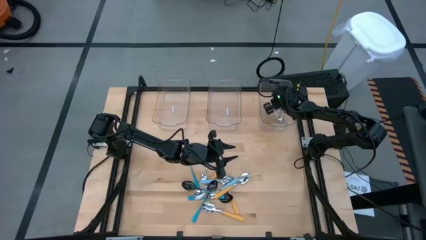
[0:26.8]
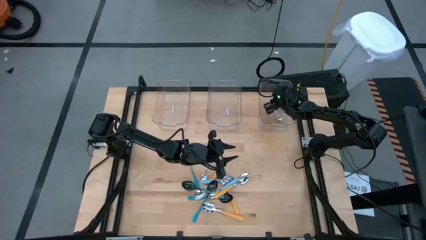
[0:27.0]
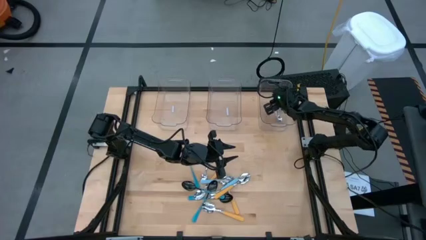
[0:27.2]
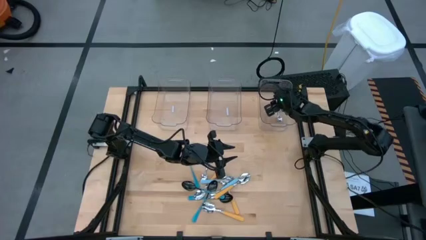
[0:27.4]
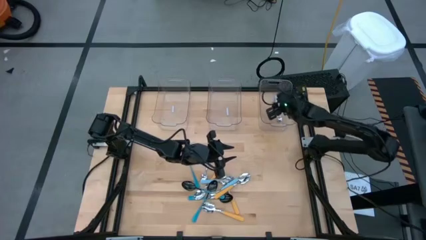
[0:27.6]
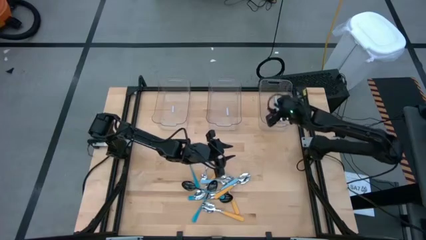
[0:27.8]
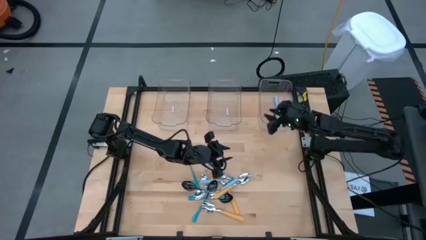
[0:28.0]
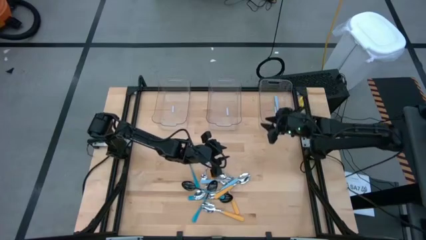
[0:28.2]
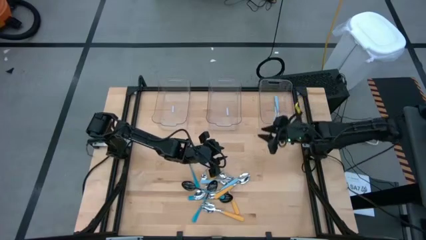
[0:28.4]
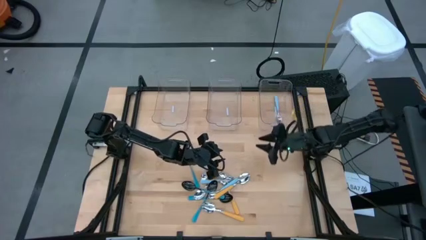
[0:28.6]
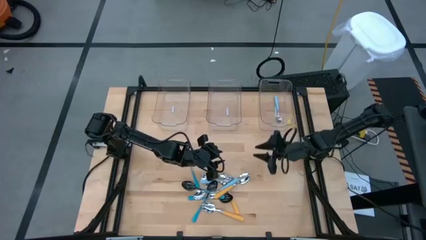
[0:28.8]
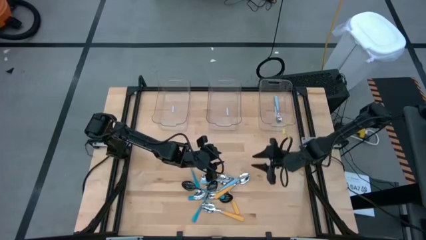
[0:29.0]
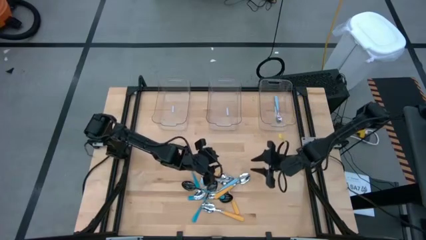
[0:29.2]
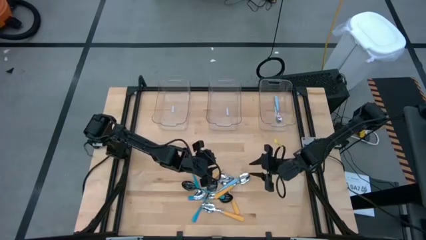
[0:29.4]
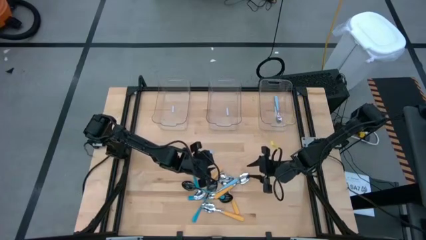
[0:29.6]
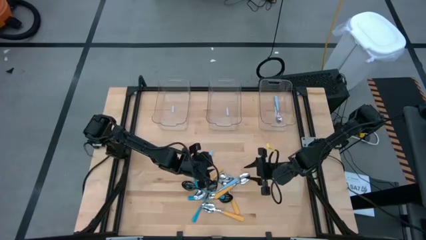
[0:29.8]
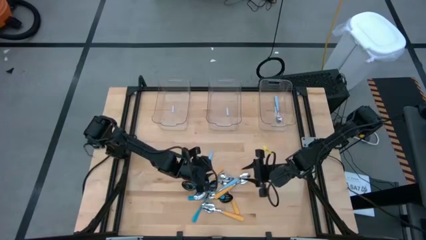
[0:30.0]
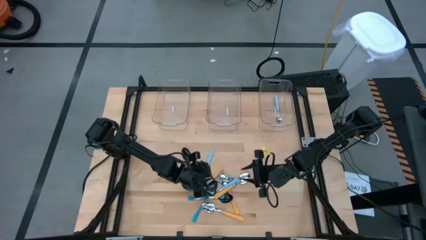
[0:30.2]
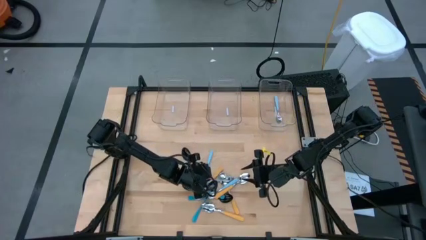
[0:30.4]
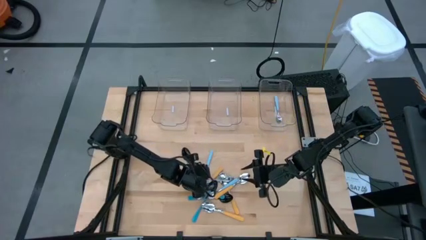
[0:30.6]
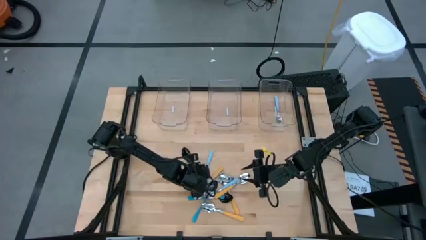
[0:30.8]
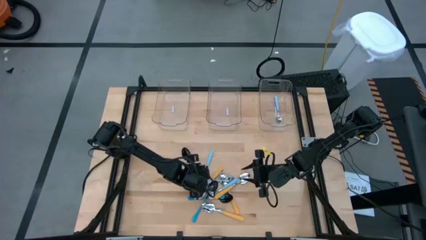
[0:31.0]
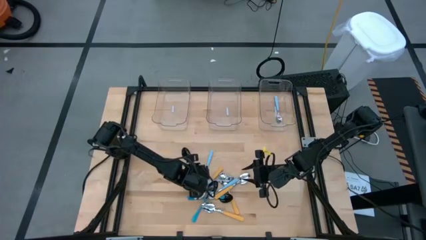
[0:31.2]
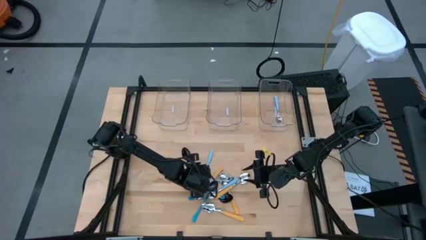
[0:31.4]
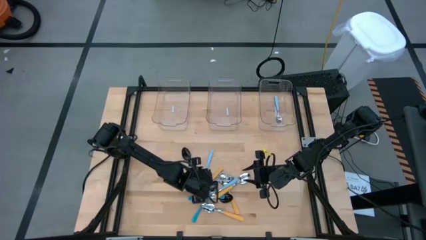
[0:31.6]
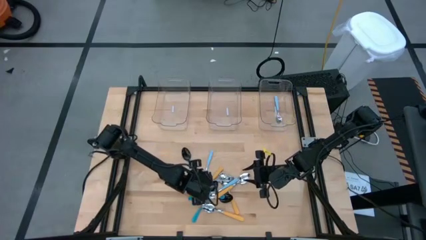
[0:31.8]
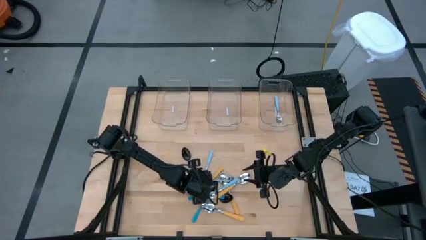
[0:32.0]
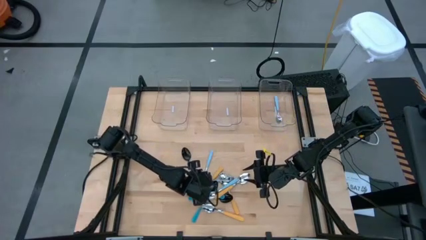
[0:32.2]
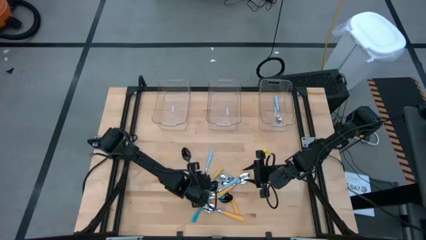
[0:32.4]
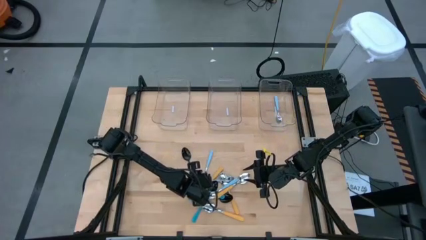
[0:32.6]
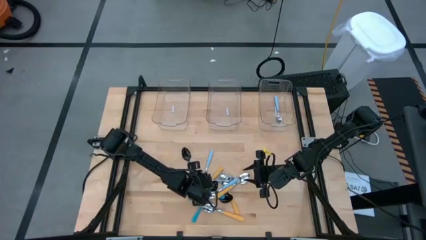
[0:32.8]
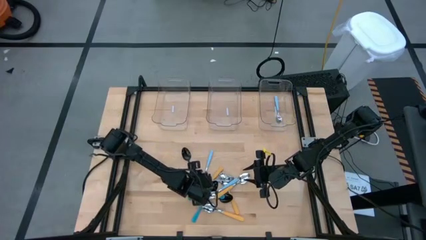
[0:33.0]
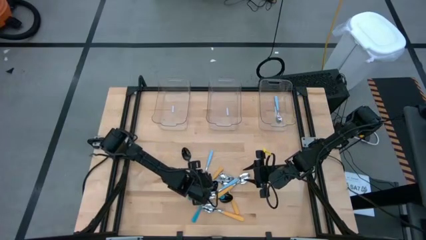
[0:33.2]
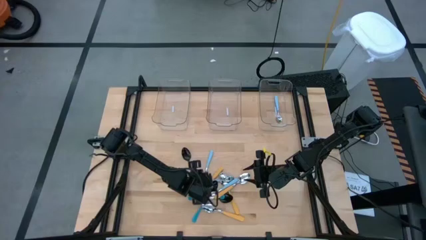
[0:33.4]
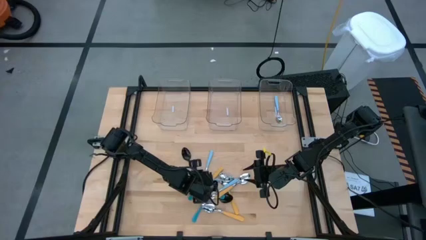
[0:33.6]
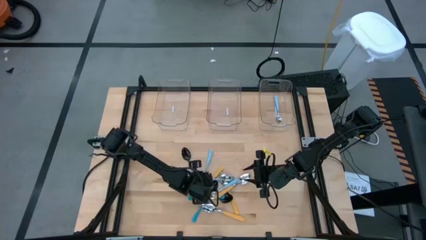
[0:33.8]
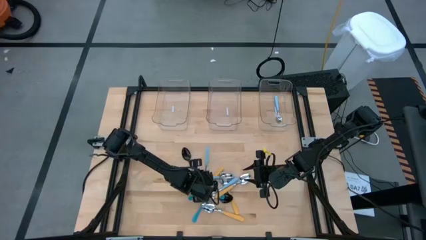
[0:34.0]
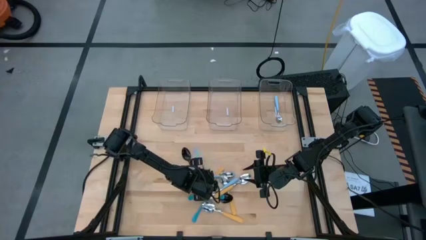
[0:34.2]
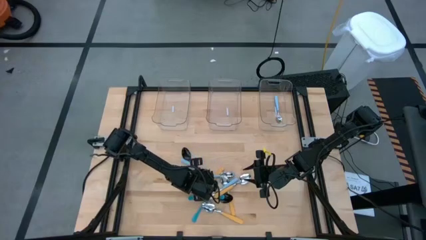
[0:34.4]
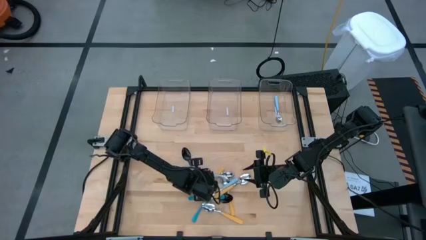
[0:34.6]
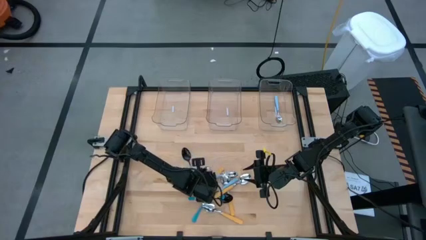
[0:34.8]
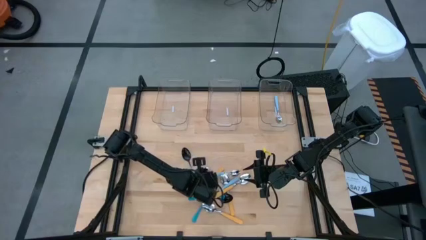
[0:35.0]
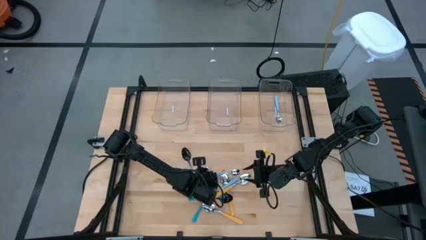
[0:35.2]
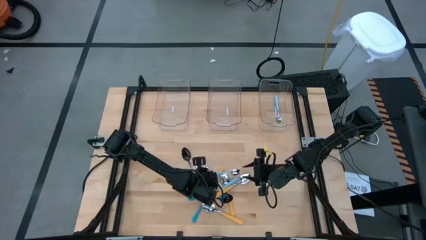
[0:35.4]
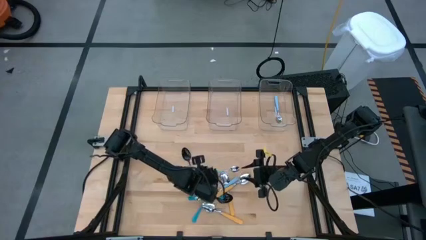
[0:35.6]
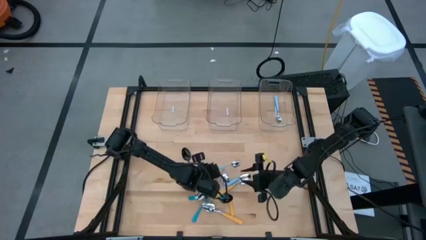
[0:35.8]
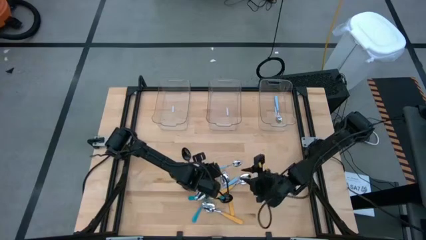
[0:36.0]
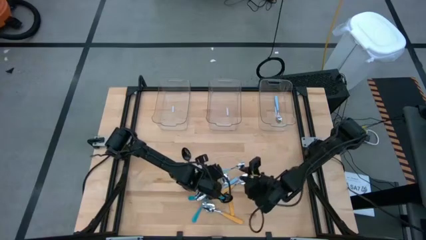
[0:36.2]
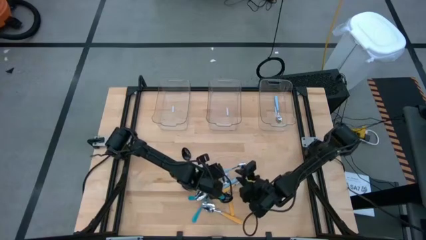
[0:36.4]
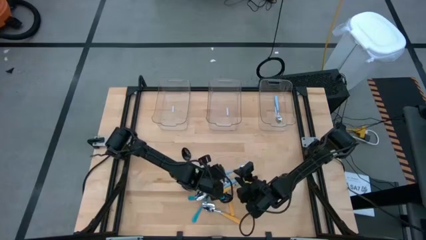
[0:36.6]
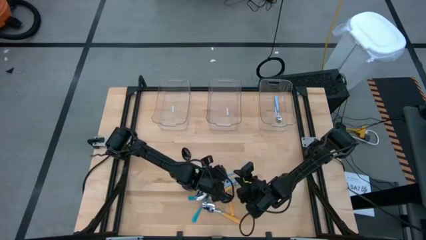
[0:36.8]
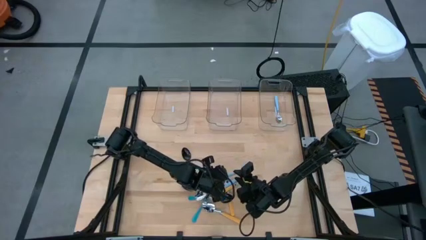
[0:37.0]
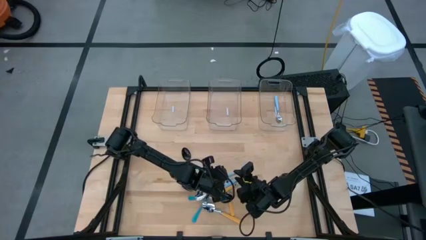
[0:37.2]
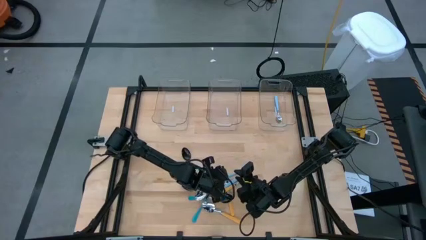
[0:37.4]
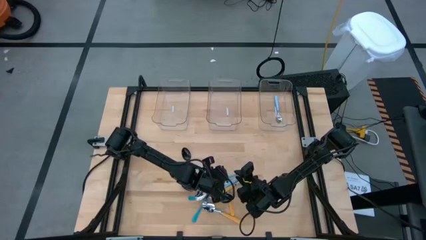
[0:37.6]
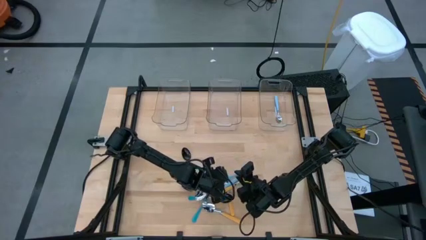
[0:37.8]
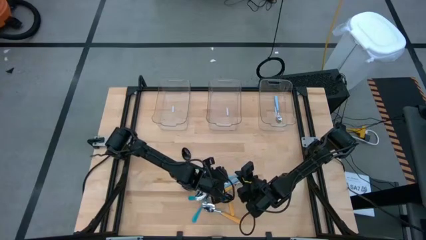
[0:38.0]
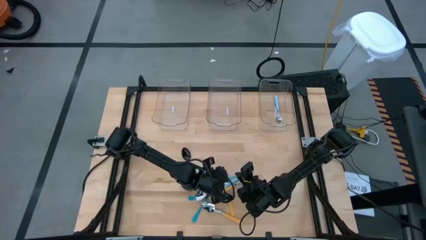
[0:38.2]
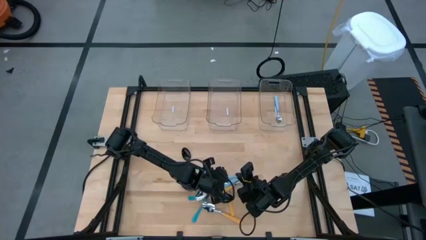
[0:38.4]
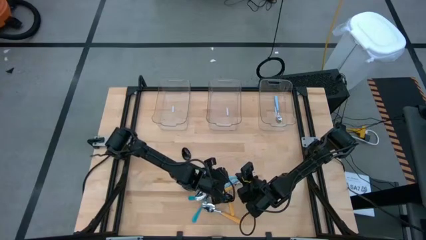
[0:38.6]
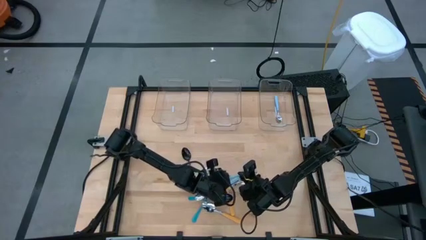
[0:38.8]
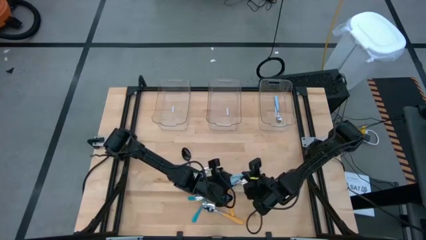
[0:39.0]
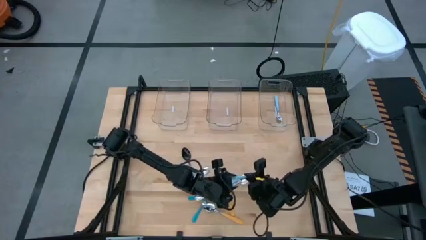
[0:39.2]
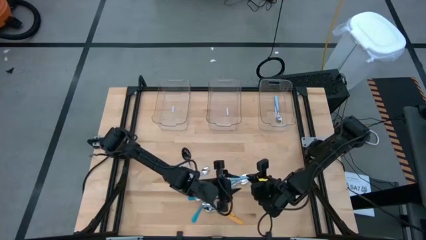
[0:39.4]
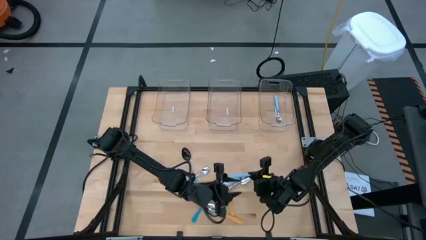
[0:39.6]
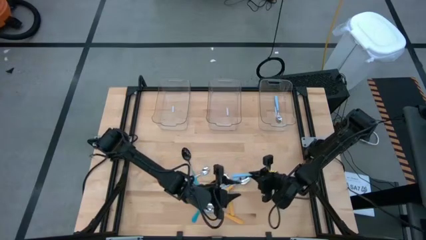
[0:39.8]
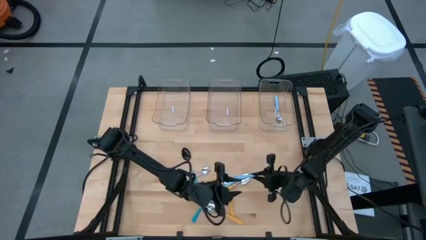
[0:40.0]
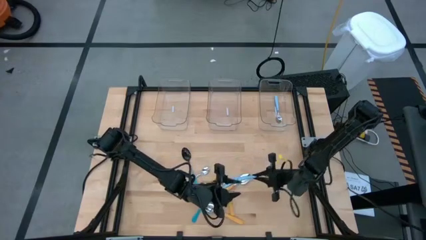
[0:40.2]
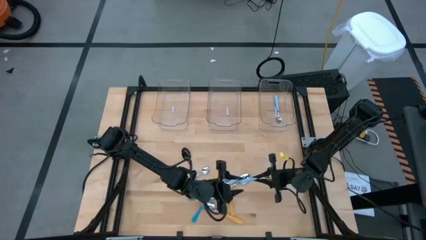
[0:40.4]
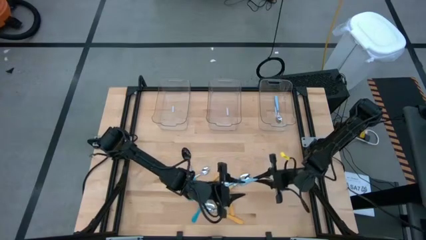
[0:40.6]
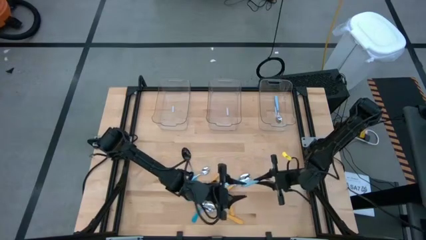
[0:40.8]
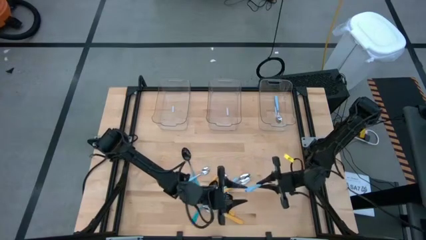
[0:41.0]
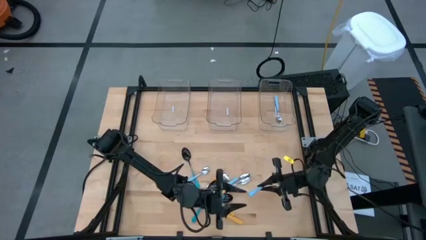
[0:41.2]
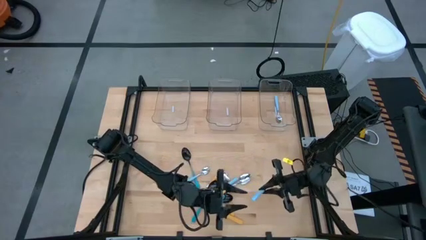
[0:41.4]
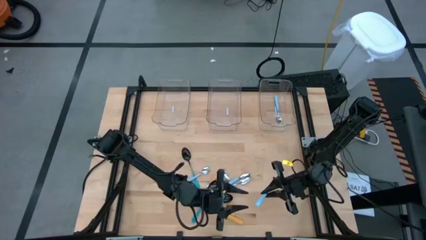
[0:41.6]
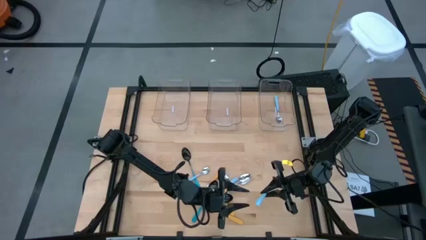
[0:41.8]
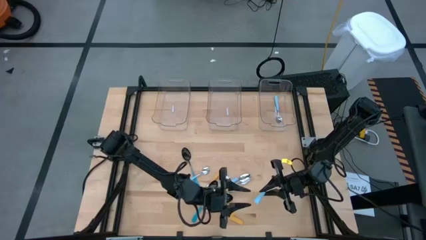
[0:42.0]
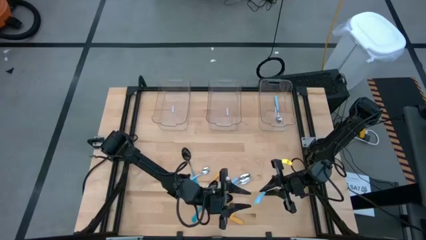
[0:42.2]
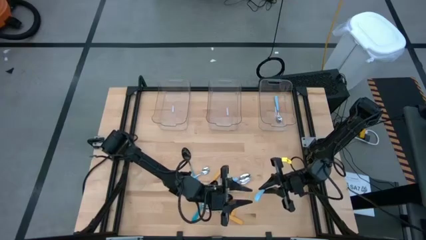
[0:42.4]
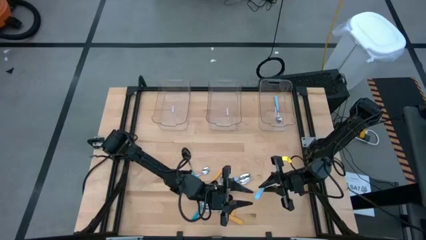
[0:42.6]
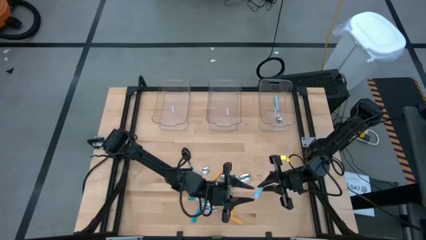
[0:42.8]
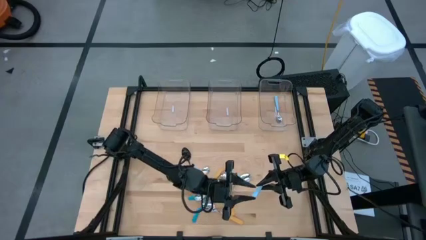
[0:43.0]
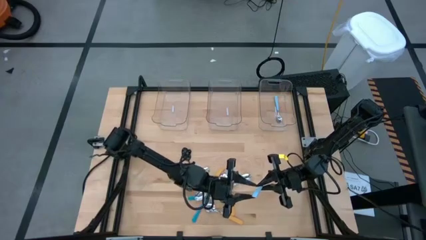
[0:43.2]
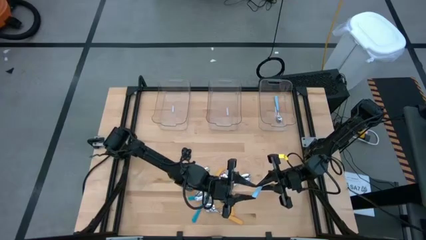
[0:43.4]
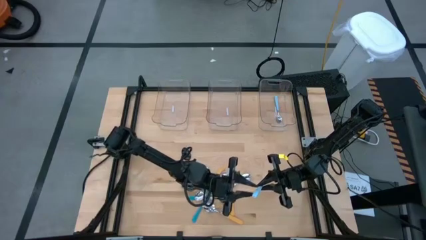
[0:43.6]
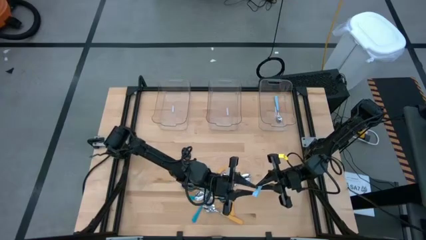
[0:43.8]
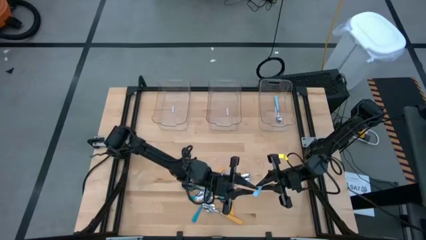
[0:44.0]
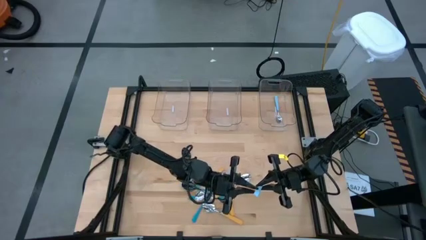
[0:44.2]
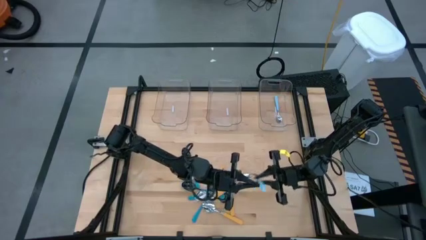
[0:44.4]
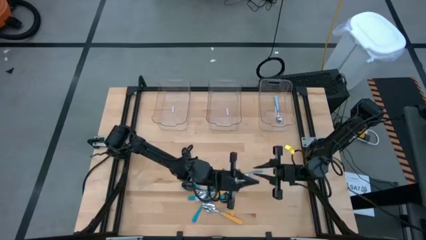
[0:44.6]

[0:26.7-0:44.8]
Task: Sort silverware by color (type)
Put the light blue spoon into the right transparent bin
